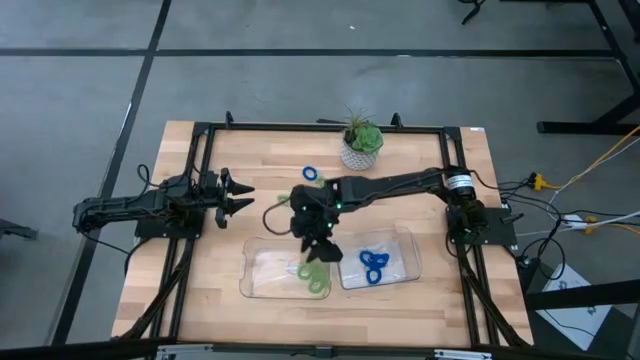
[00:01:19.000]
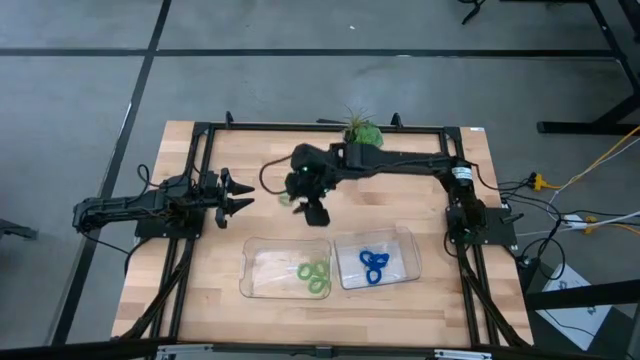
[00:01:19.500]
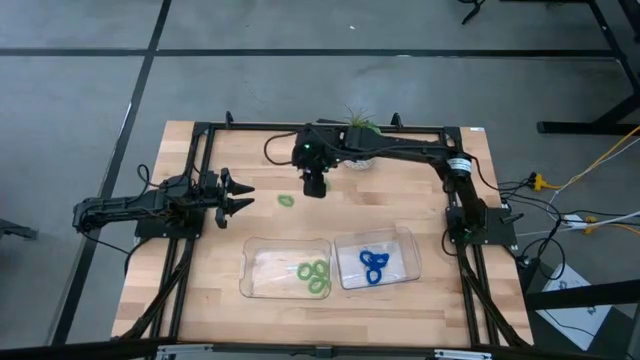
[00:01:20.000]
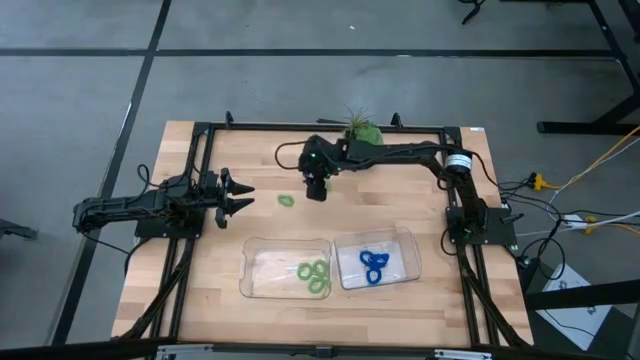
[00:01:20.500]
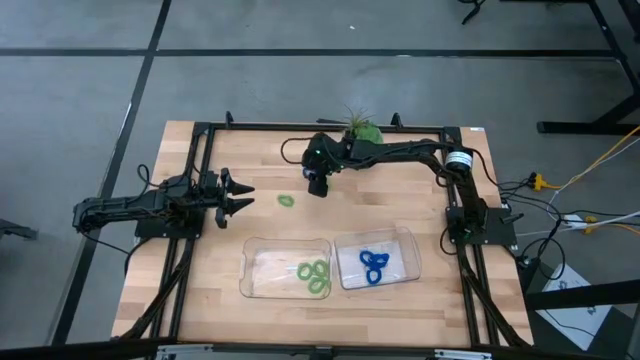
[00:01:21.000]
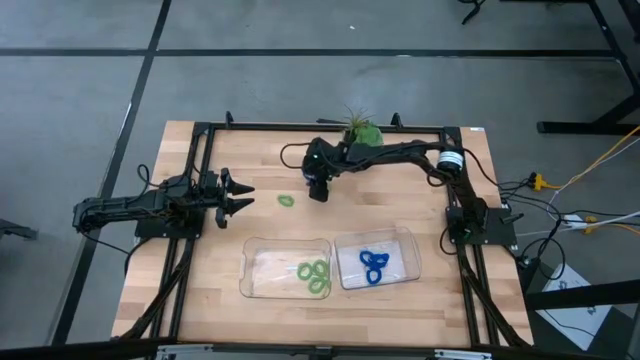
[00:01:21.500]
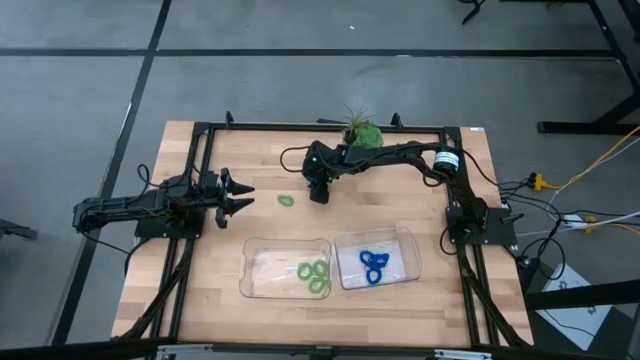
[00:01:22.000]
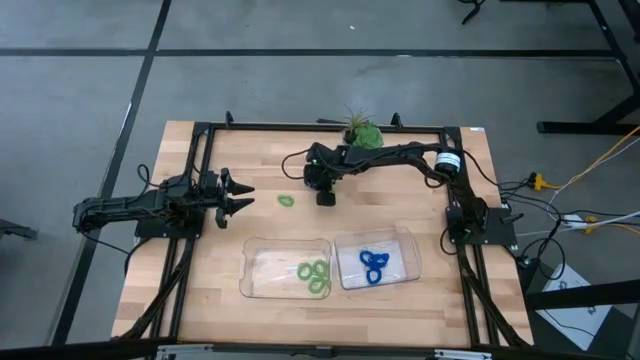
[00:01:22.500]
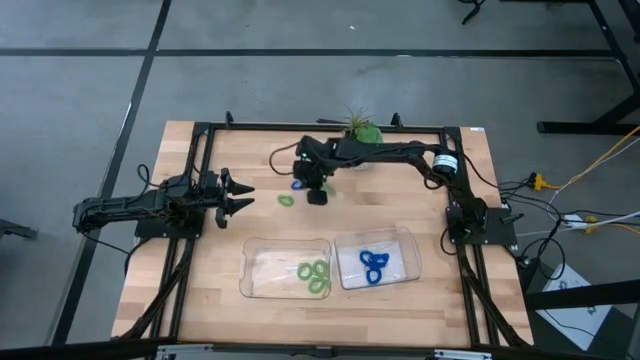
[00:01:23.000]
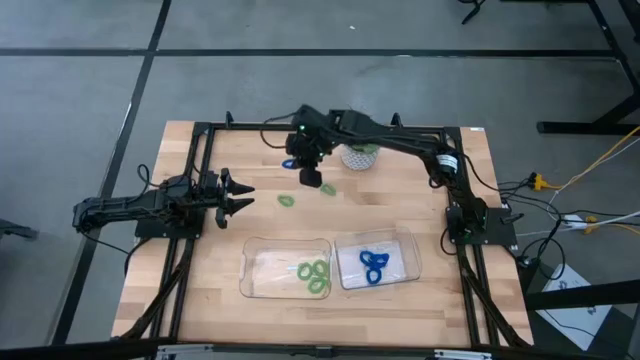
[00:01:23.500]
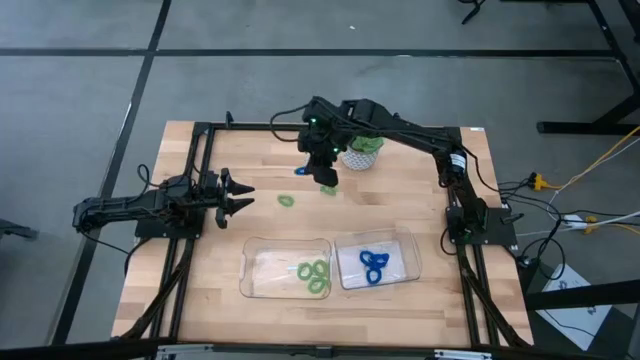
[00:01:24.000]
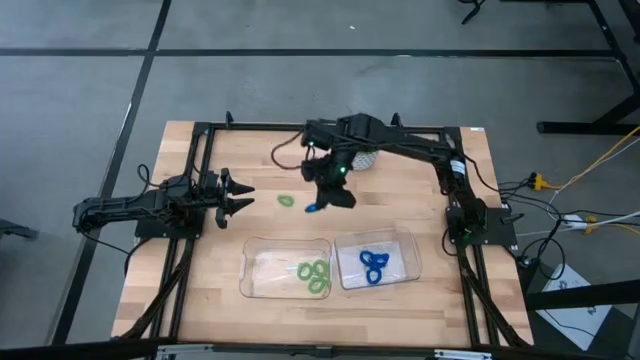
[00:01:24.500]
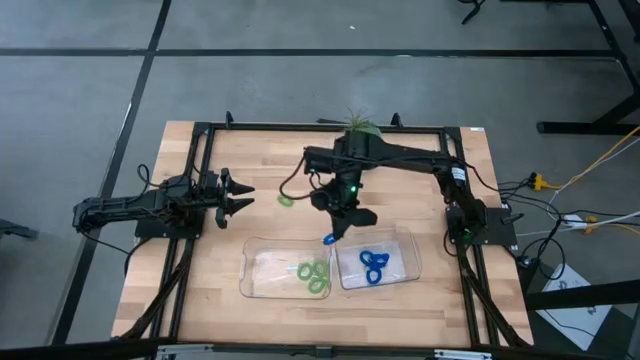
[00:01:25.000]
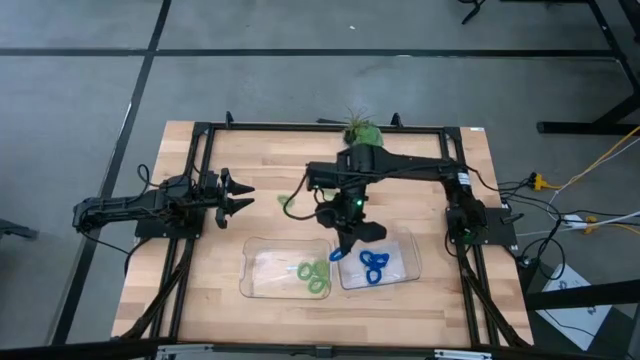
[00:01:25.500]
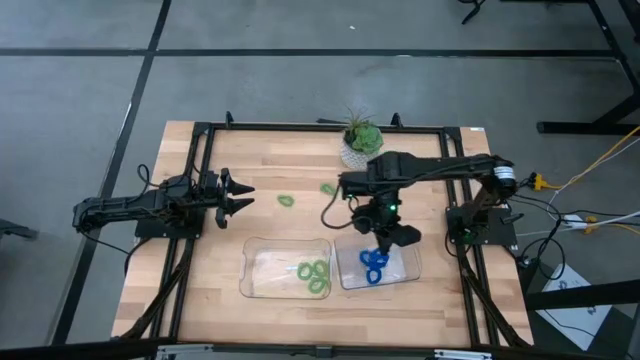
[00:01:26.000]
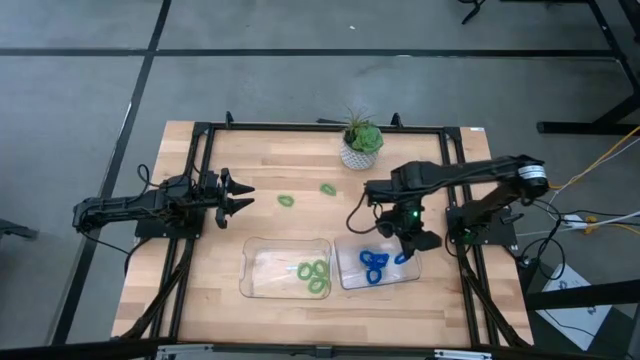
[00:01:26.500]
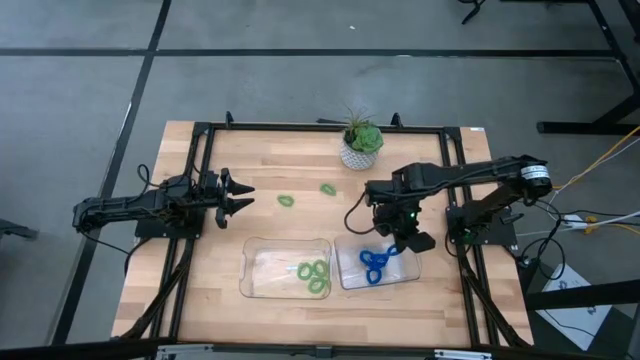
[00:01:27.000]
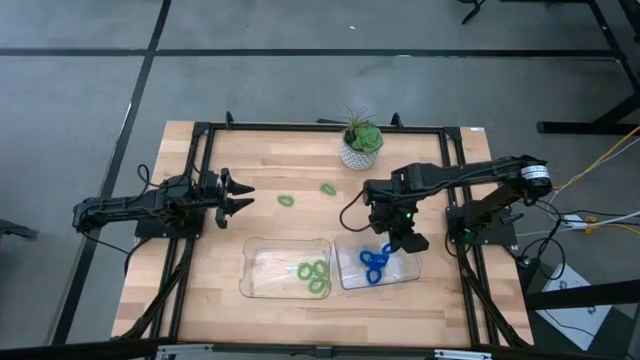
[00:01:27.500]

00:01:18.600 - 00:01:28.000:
Task: Sort spring keychains
Put the blue spring keychain into the right transparent bin

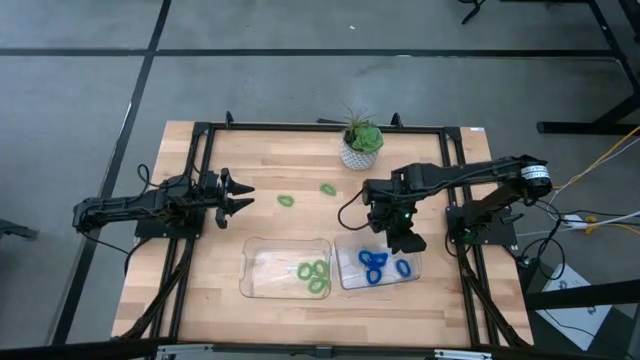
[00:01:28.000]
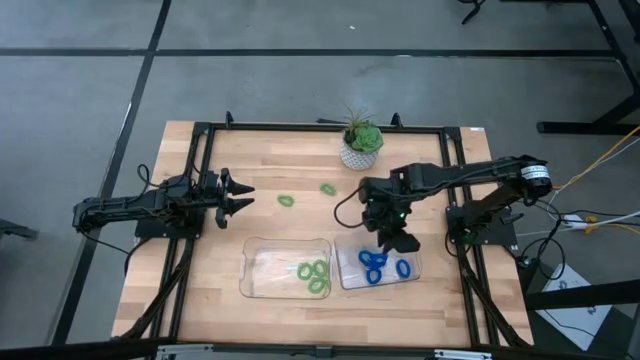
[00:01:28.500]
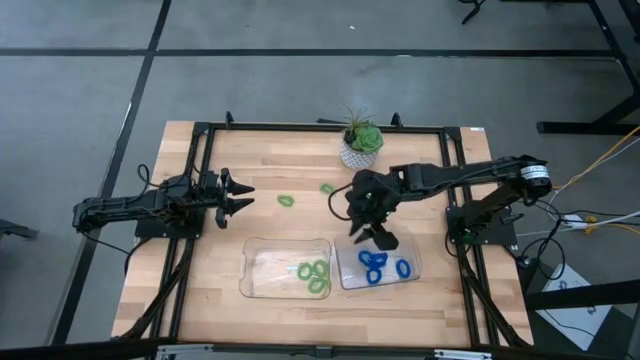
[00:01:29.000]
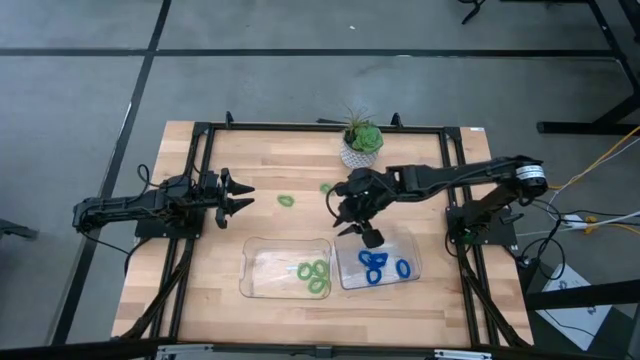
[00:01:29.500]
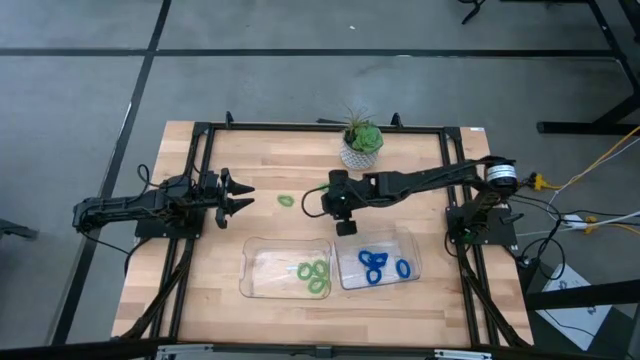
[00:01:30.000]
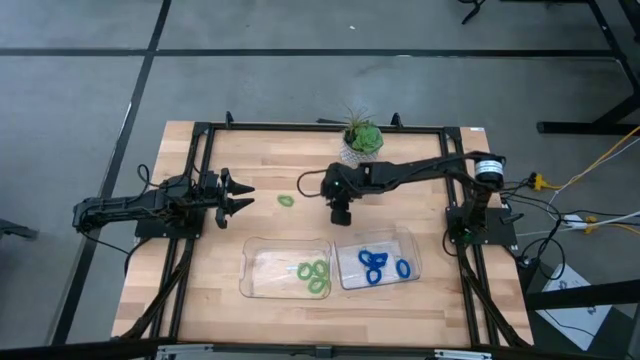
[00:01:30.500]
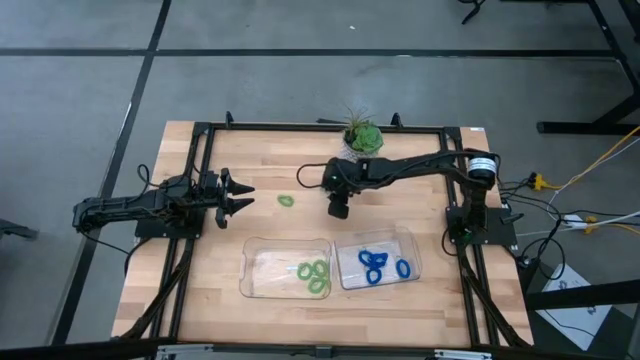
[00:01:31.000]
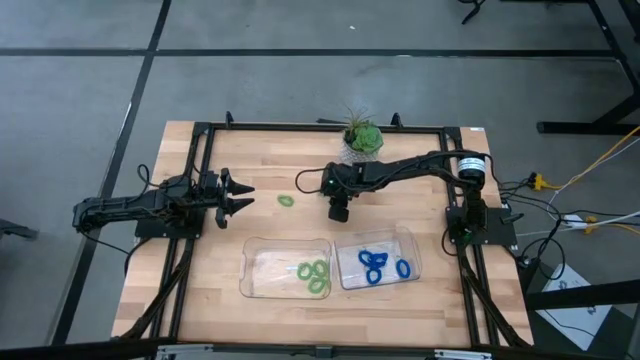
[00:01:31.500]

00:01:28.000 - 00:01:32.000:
Put the green spring keychain into the left transparent bin

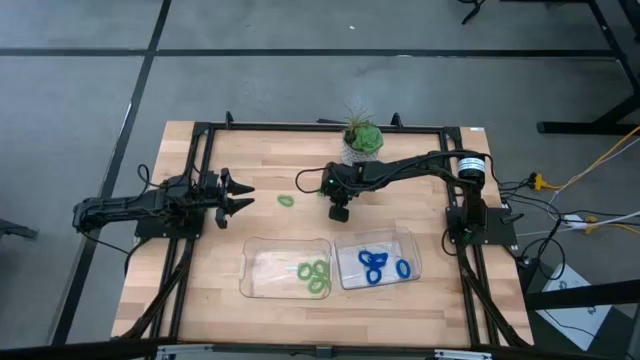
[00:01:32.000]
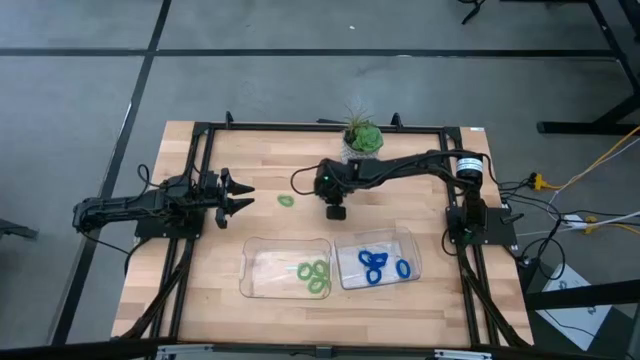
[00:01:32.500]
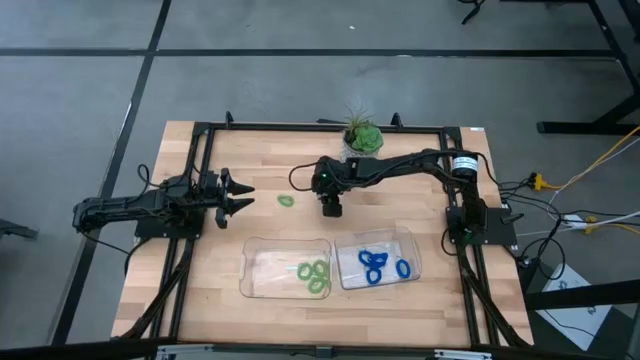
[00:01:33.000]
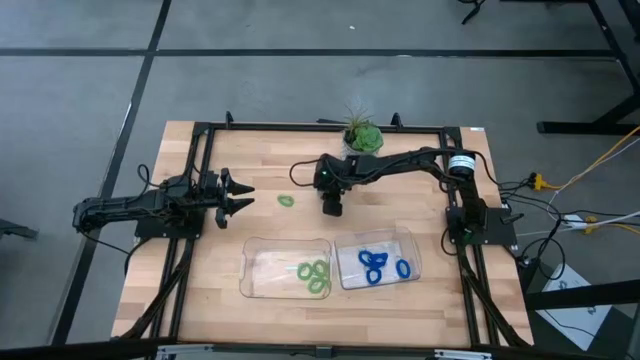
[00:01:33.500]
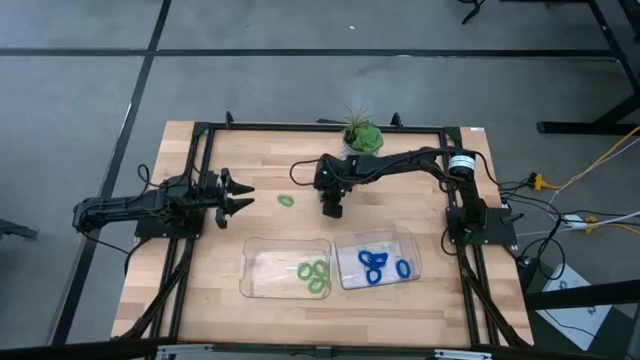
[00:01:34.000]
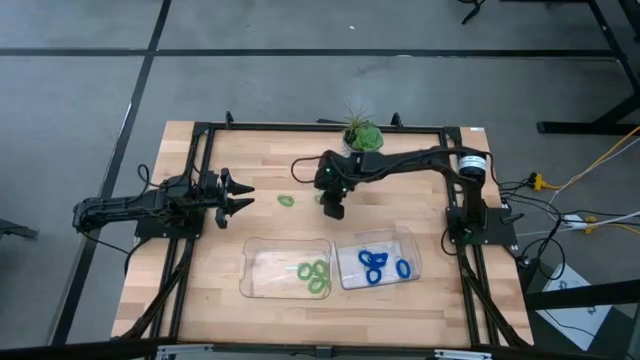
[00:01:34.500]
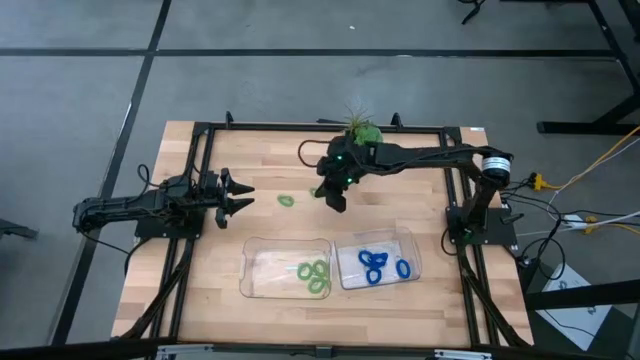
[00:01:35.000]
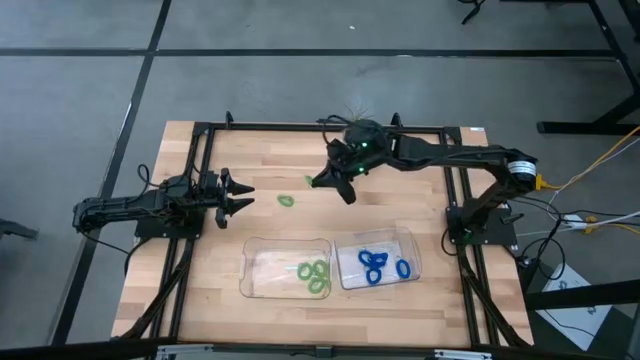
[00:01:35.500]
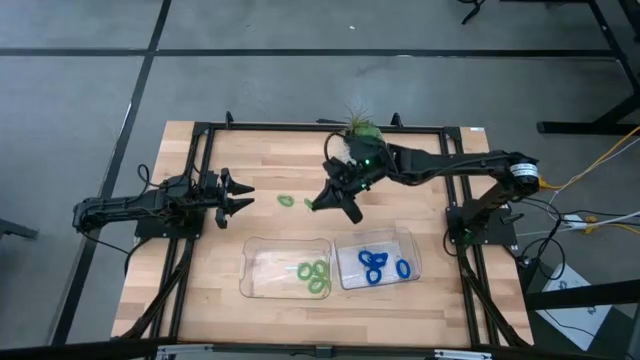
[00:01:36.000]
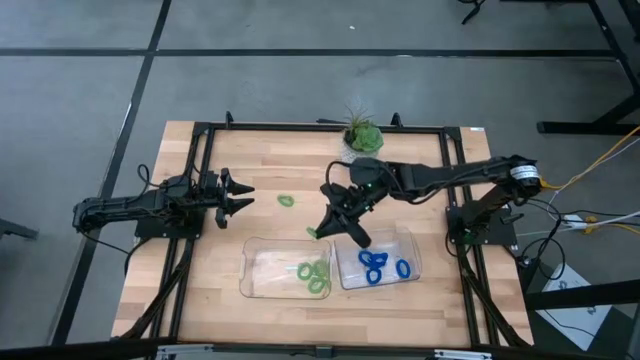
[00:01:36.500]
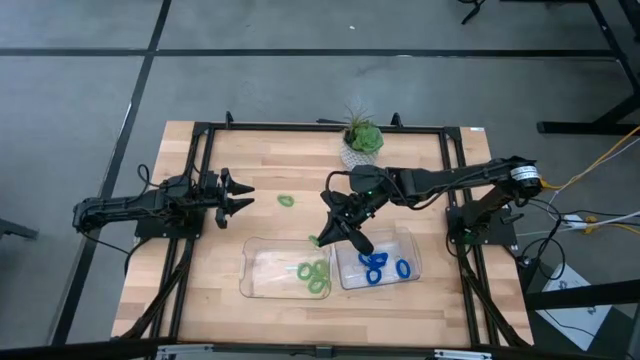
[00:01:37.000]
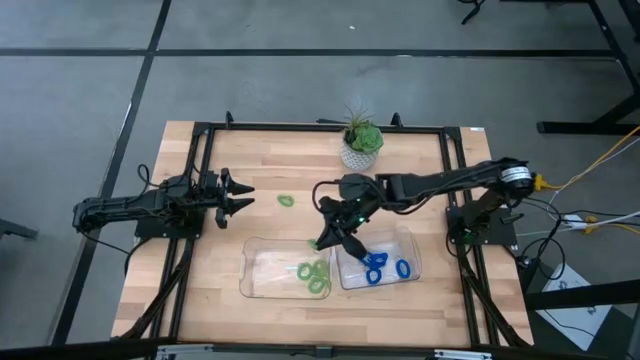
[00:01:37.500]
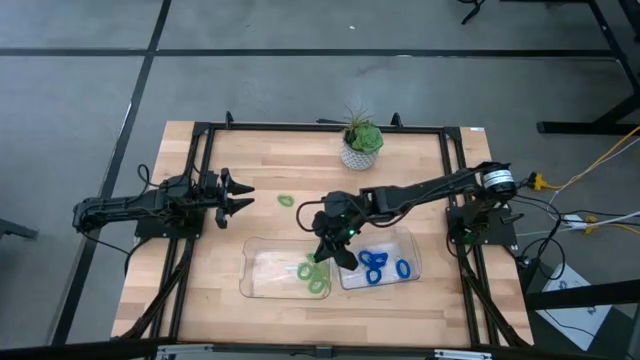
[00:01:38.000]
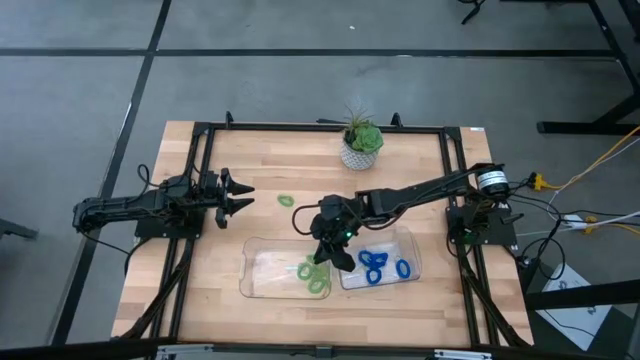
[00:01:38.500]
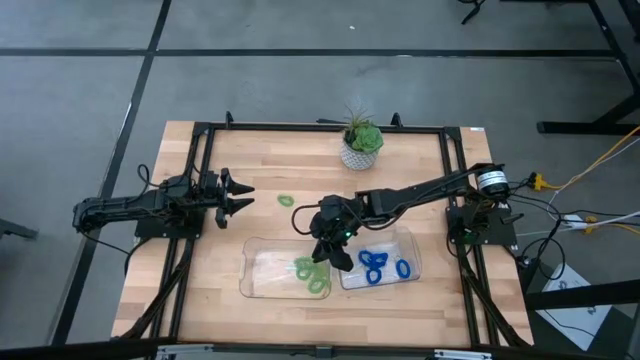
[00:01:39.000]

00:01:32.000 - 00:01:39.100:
Put the green spring keychain into the left transparent bin
